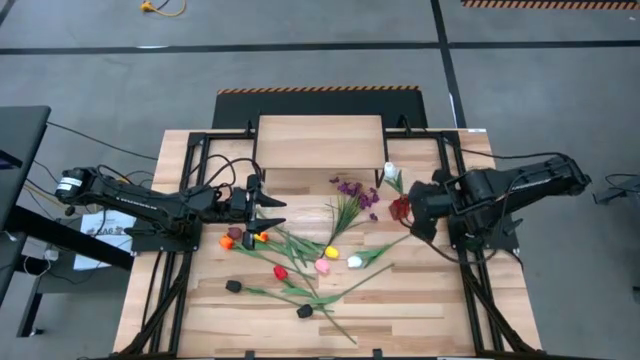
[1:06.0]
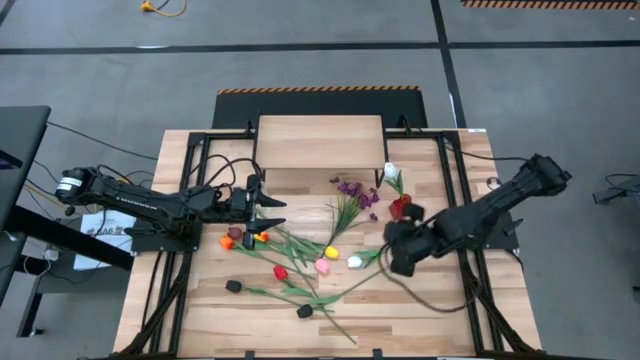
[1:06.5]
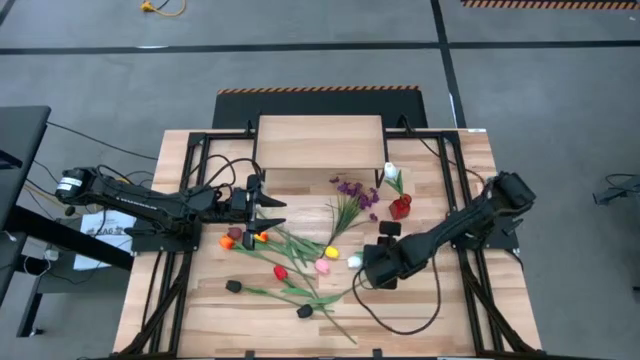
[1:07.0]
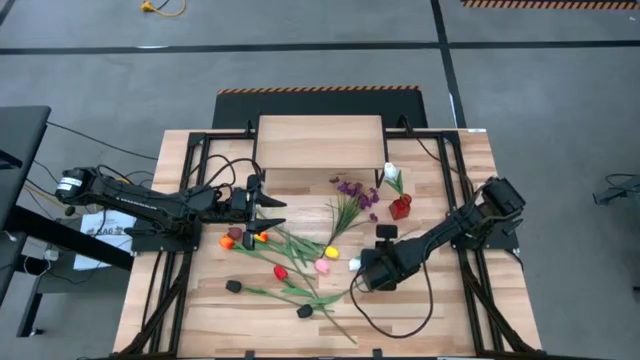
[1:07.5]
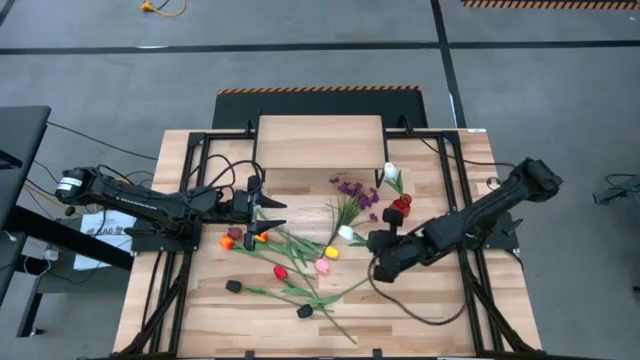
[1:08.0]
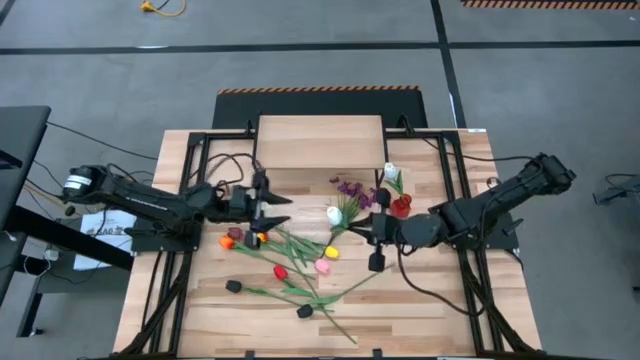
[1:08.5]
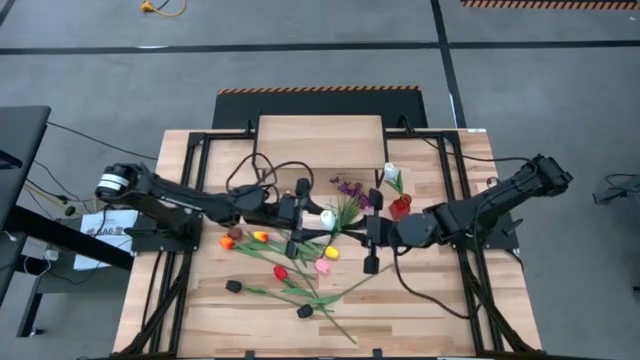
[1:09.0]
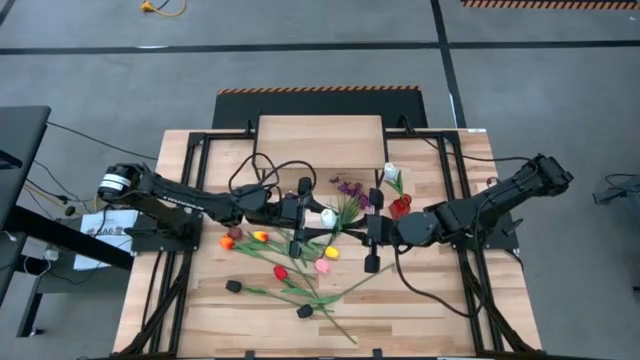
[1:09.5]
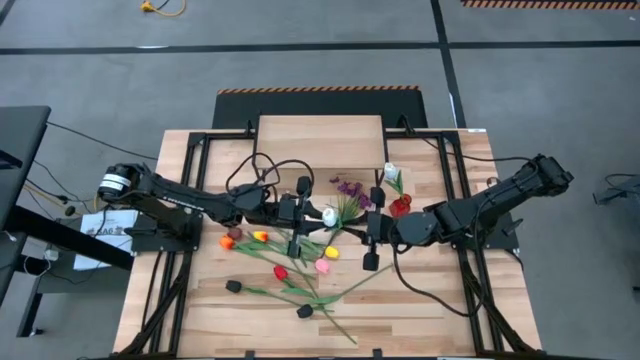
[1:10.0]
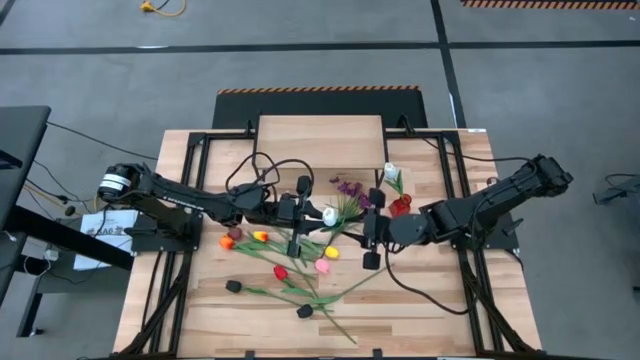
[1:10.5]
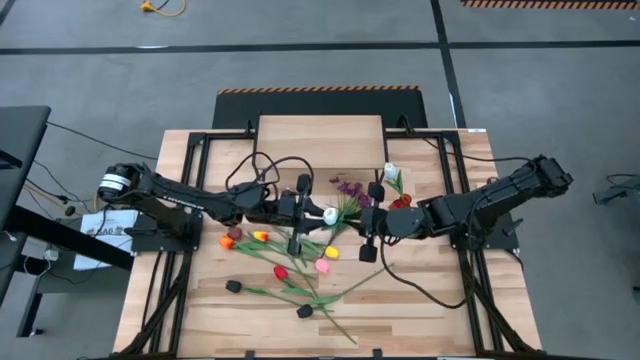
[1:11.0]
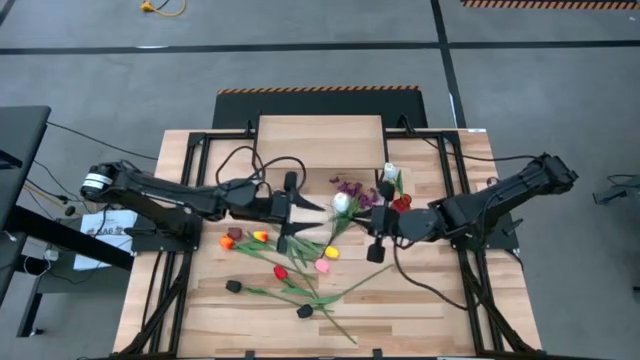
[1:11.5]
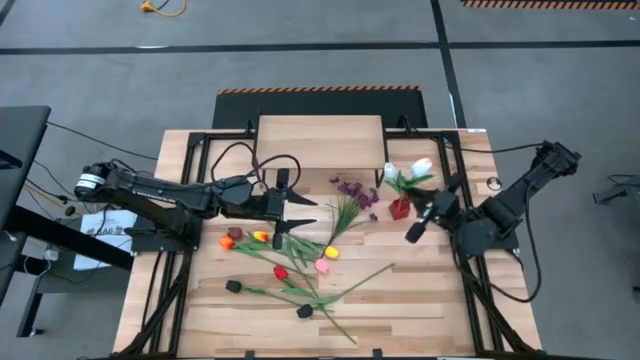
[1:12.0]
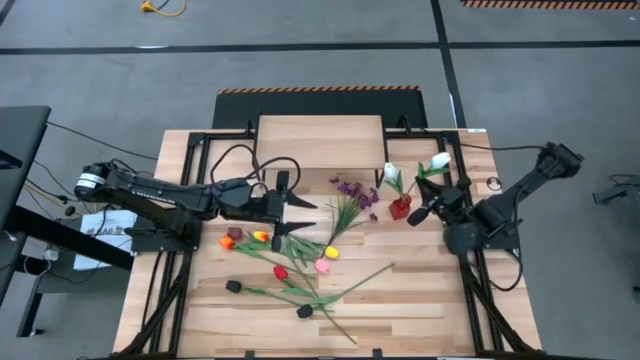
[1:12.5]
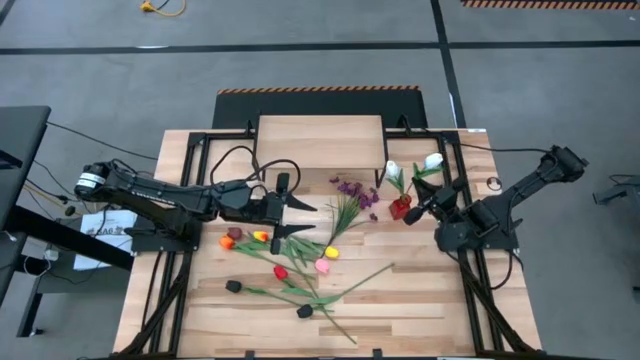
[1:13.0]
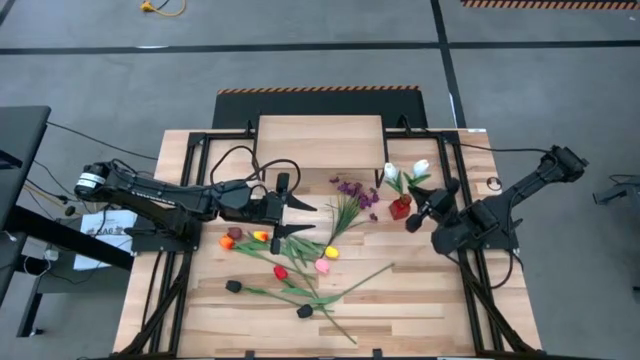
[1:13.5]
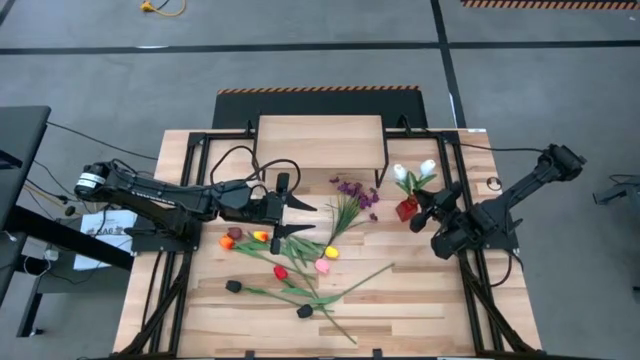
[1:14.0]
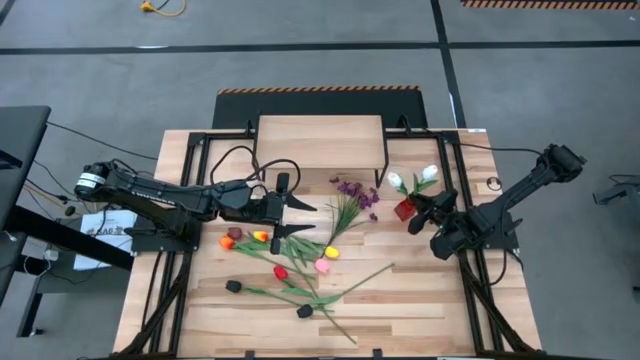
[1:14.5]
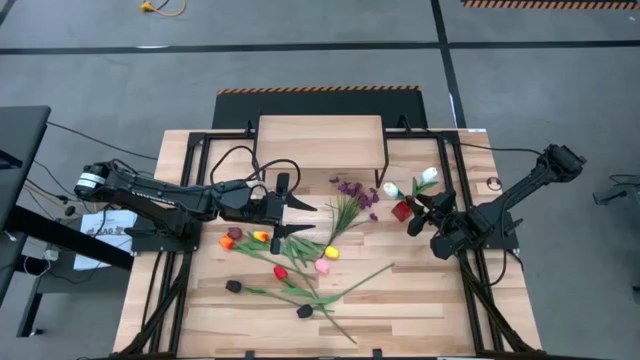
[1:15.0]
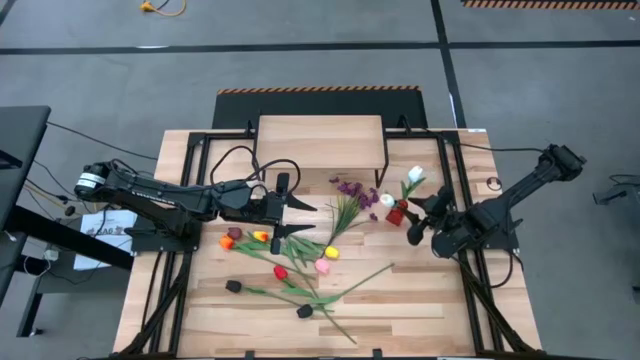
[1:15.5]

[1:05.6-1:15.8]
Task: Pick and place flowers into a vace then onto a shelf
Put the white flower into the red vase

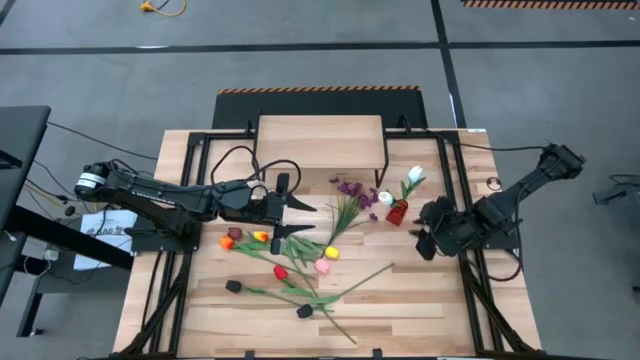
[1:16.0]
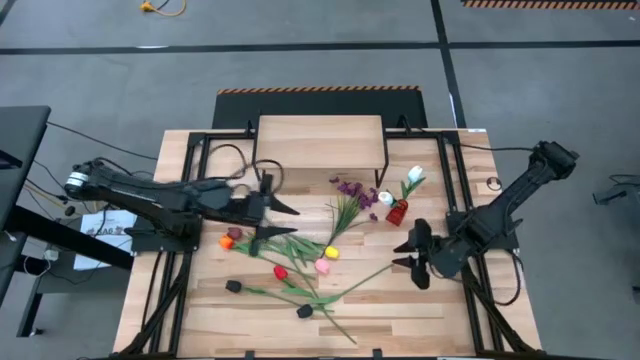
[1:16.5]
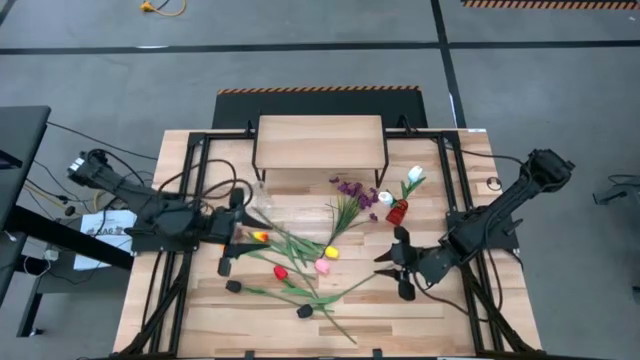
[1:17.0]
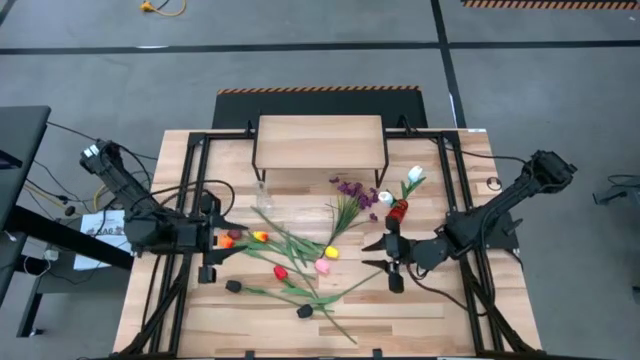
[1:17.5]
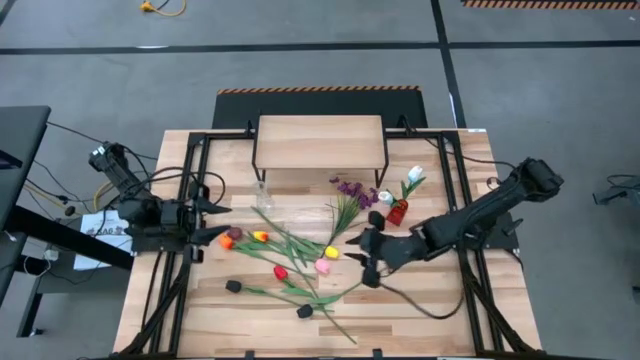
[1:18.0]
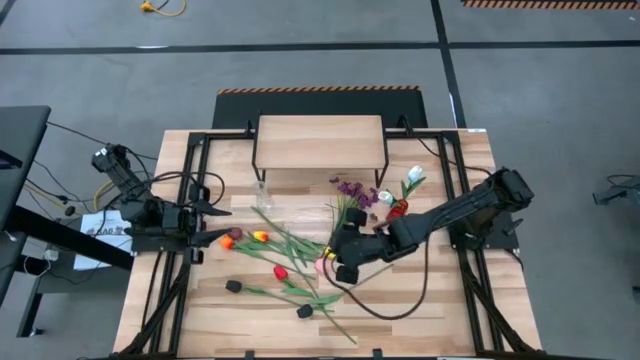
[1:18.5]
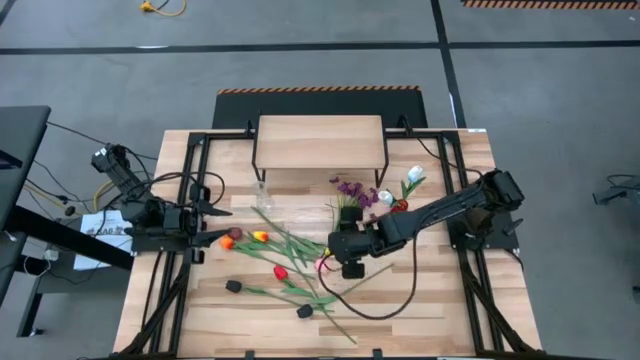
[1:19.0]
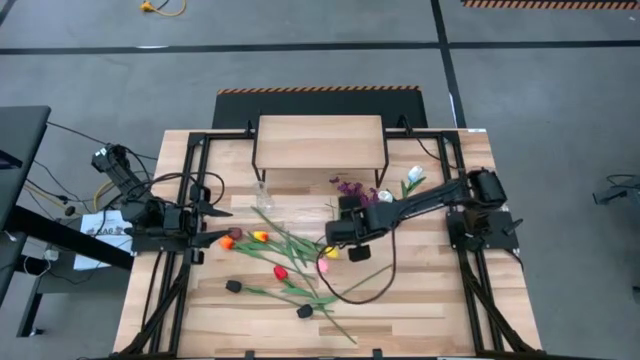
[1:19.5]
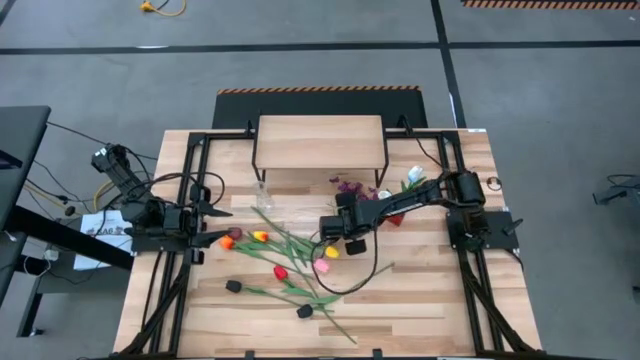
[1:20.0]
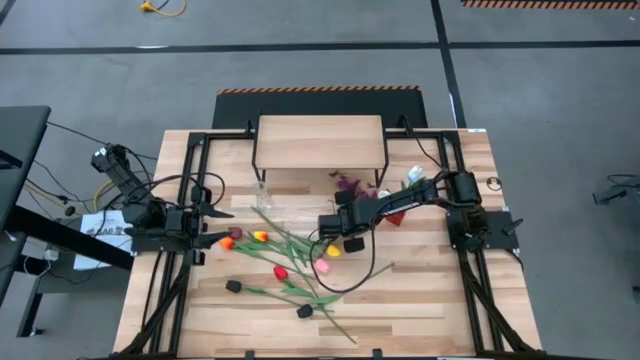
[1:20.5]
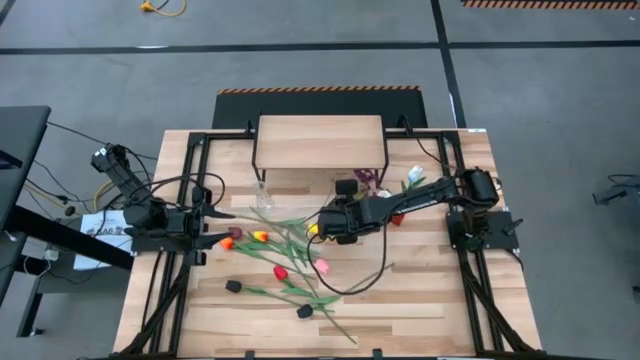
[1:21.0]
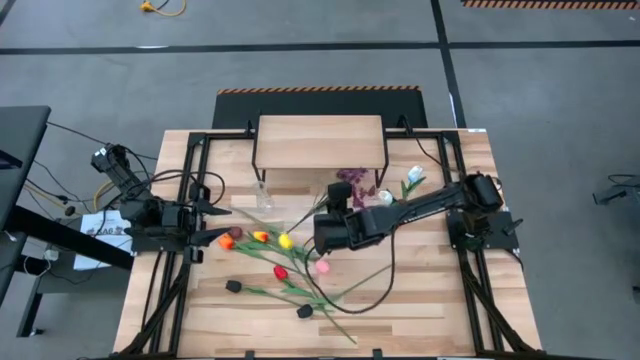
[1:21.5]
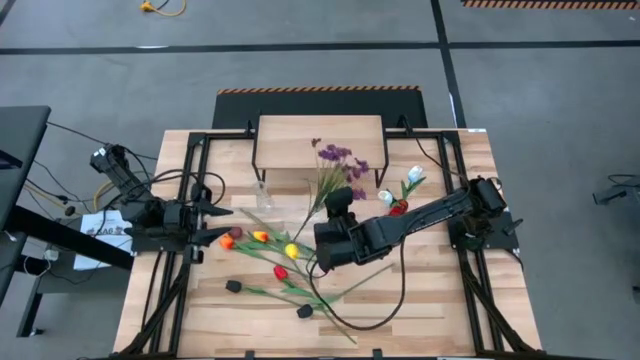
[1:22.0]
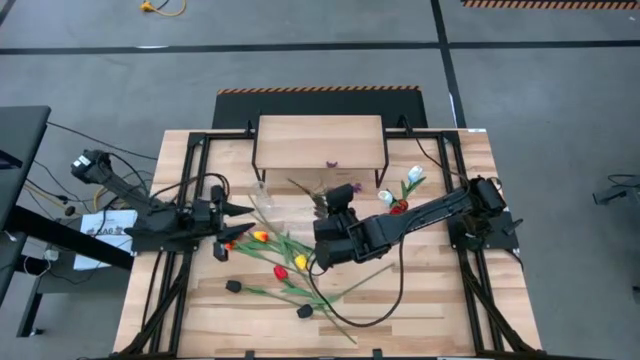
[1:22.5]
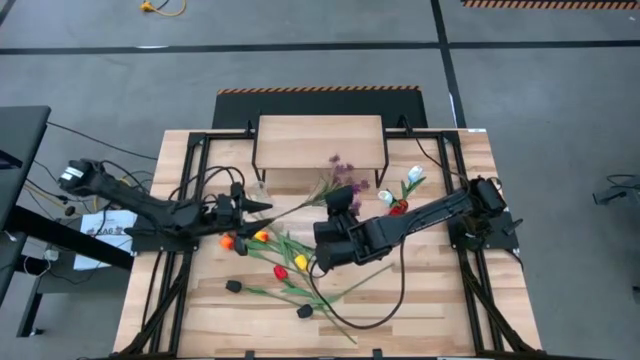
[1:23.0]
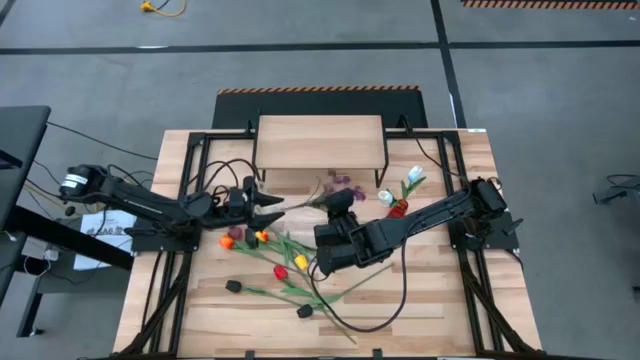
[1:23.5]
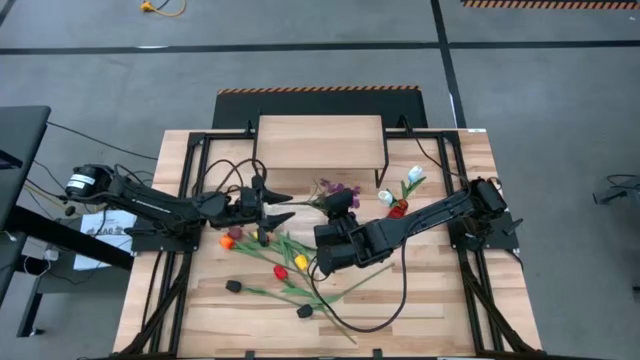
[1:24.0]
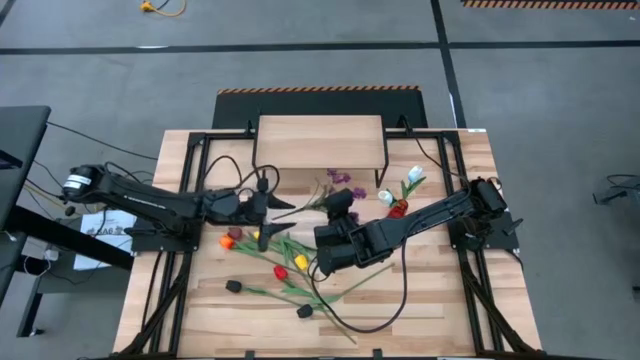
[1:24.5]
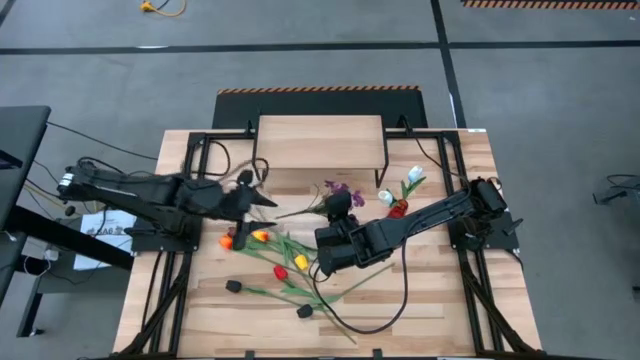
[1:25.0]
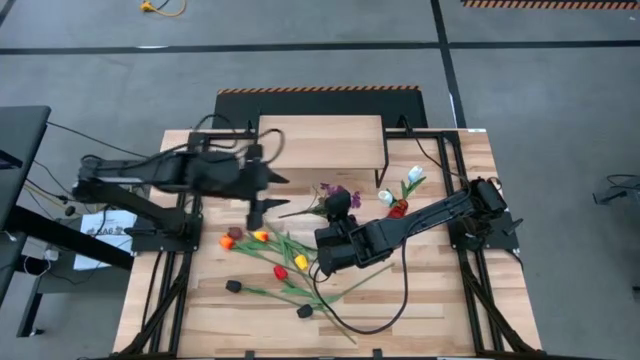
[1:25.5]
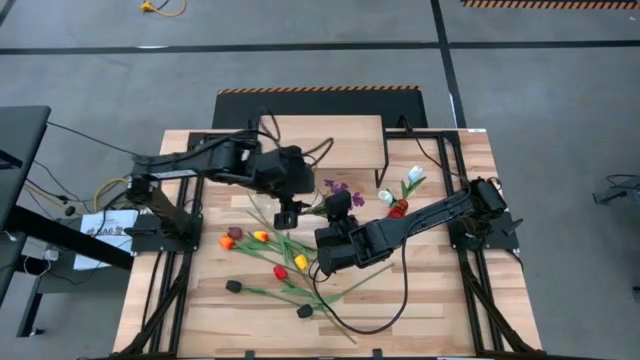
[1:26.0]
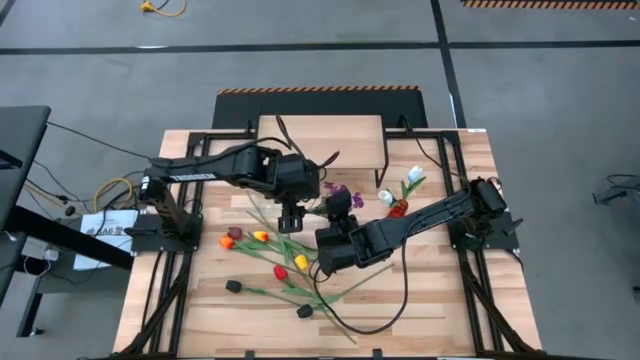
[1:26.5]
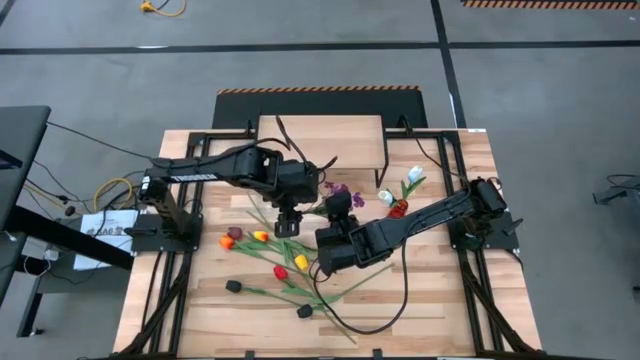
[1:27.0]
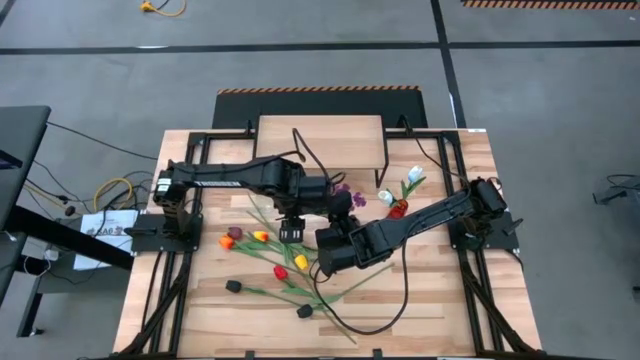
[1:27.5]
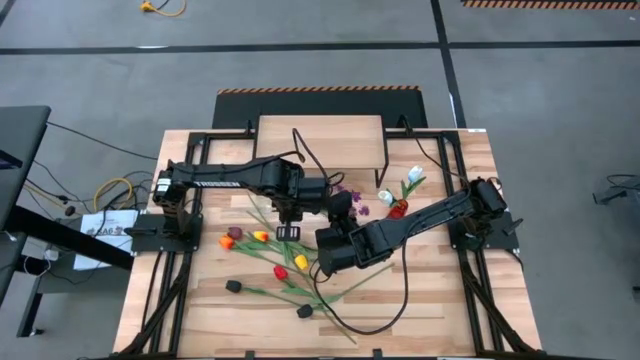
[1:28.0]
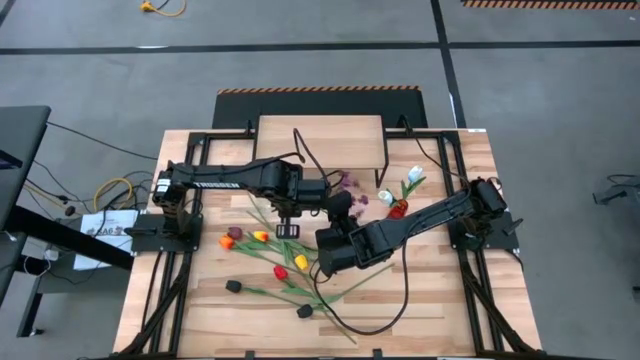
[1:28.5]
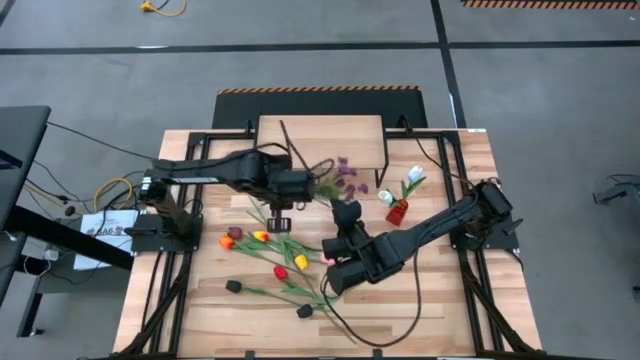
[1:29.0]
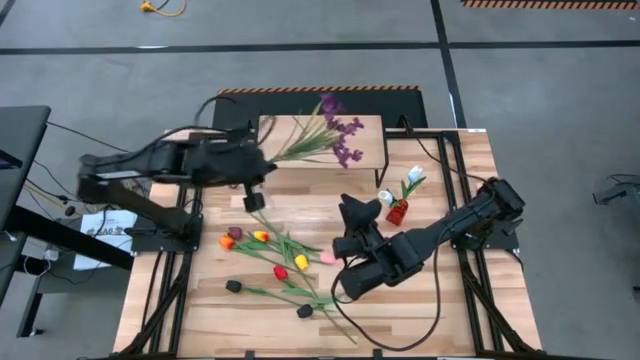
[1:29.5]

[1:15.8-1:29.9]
Put the violet flowers into the red vase
